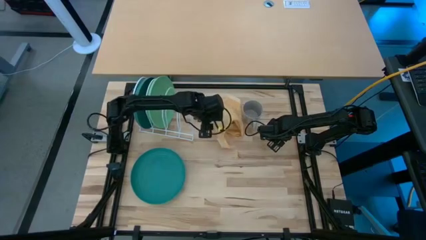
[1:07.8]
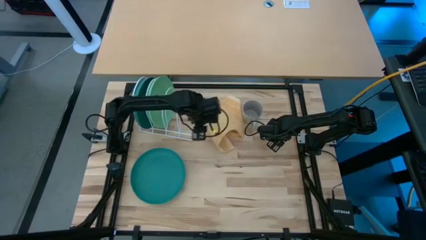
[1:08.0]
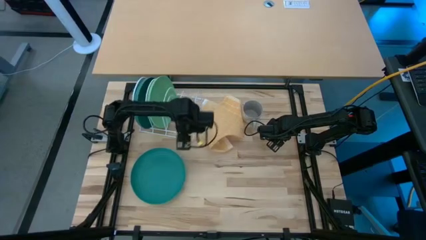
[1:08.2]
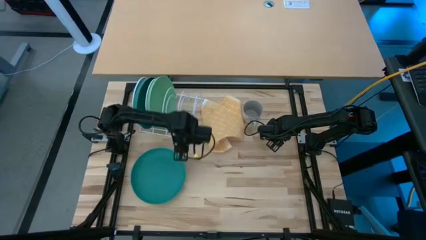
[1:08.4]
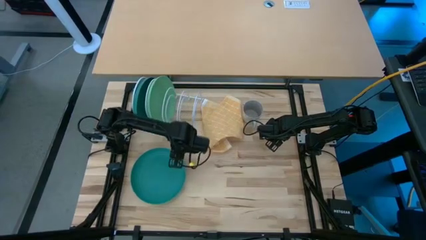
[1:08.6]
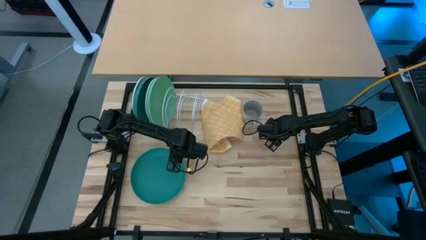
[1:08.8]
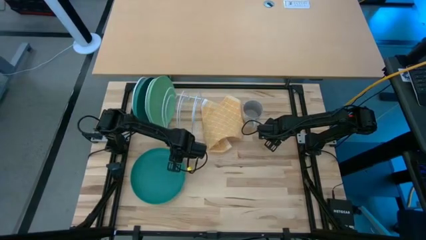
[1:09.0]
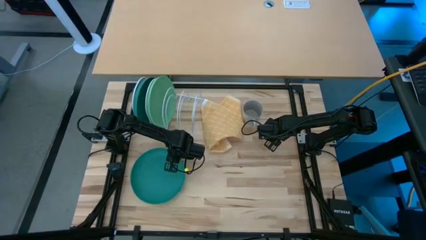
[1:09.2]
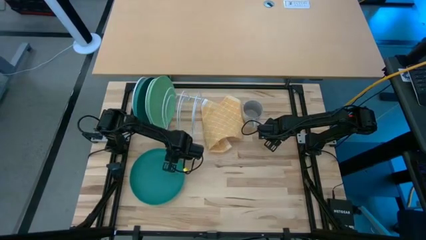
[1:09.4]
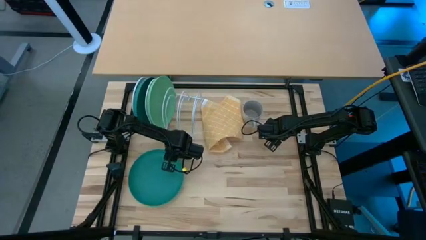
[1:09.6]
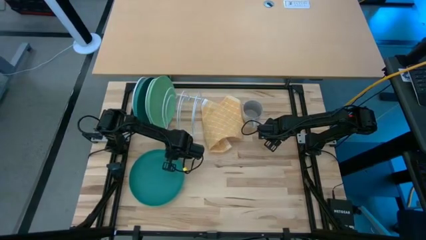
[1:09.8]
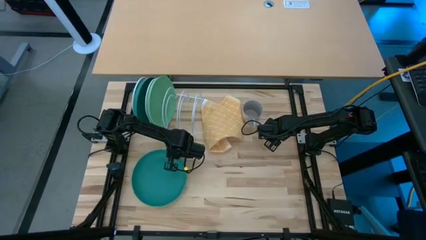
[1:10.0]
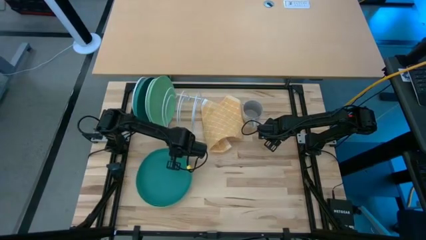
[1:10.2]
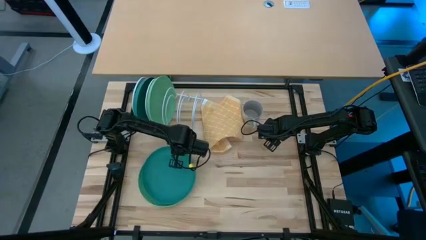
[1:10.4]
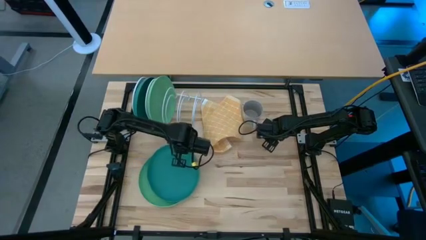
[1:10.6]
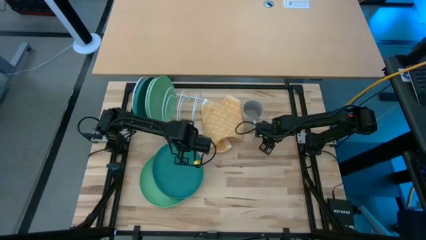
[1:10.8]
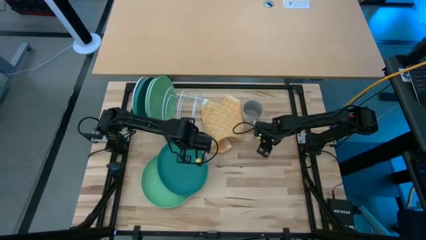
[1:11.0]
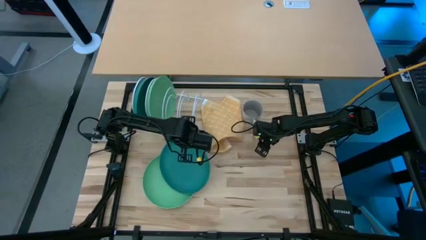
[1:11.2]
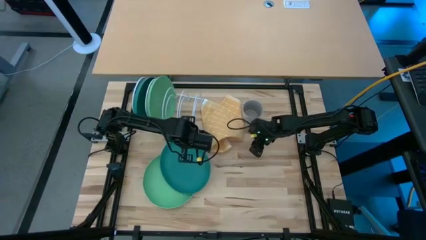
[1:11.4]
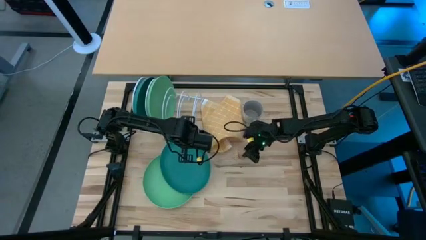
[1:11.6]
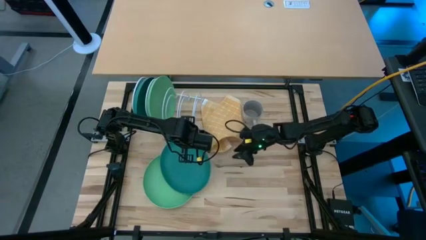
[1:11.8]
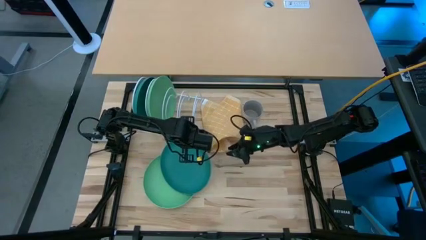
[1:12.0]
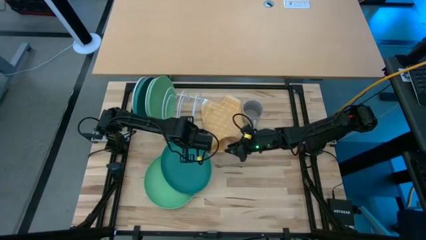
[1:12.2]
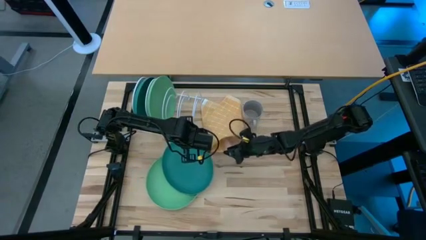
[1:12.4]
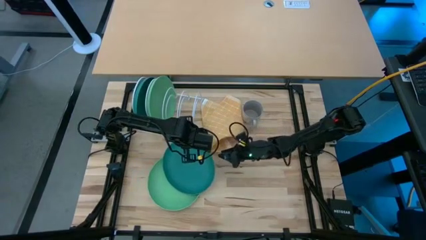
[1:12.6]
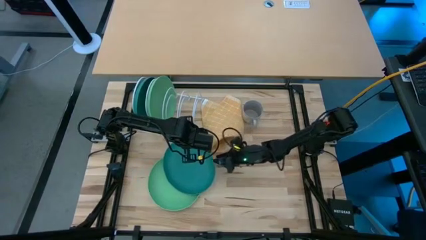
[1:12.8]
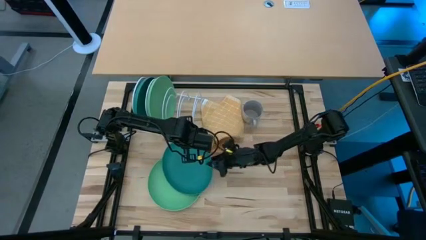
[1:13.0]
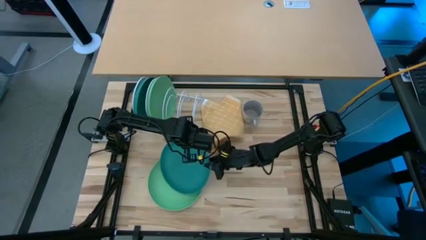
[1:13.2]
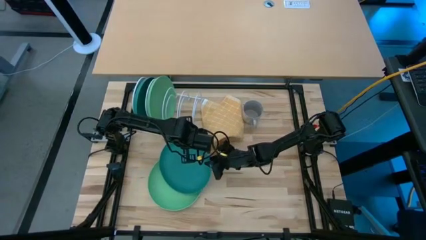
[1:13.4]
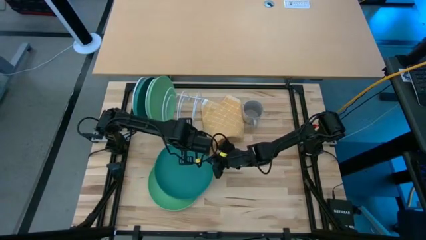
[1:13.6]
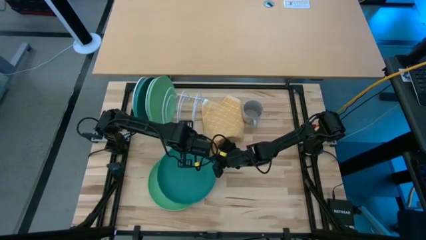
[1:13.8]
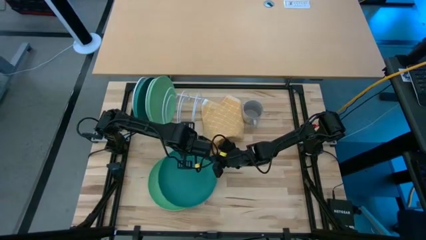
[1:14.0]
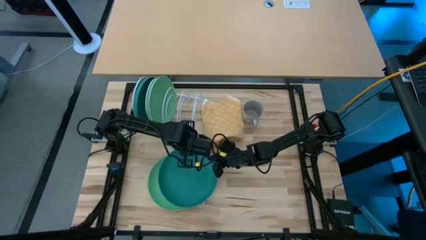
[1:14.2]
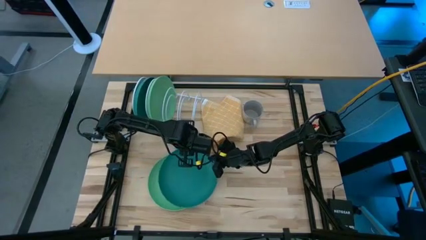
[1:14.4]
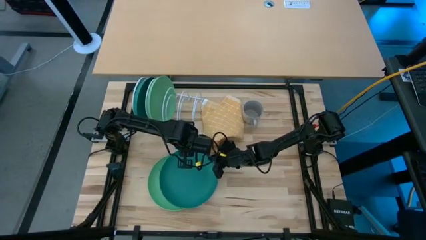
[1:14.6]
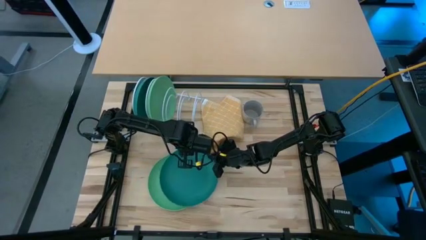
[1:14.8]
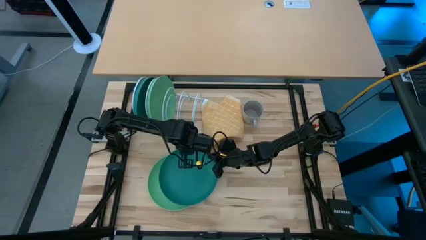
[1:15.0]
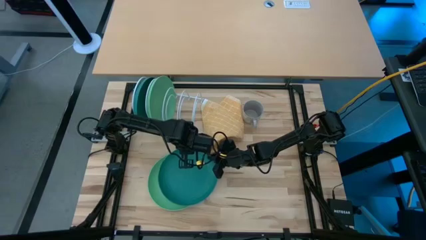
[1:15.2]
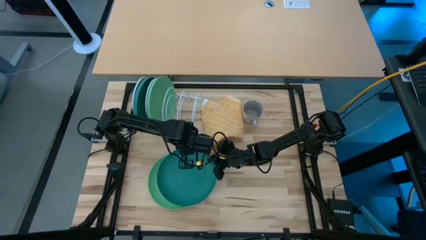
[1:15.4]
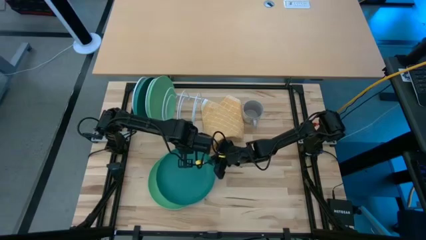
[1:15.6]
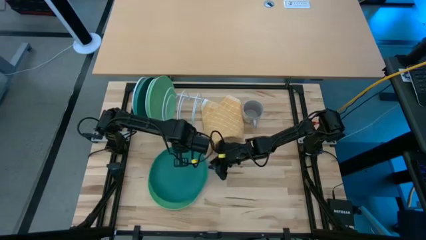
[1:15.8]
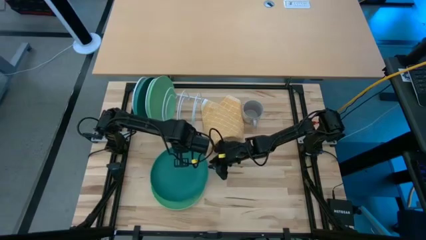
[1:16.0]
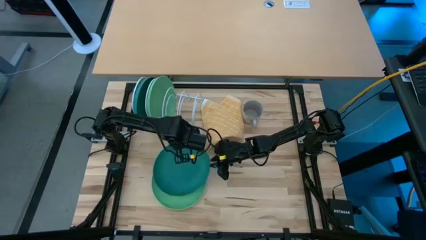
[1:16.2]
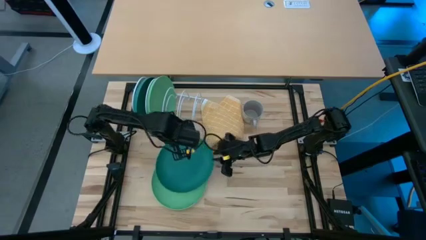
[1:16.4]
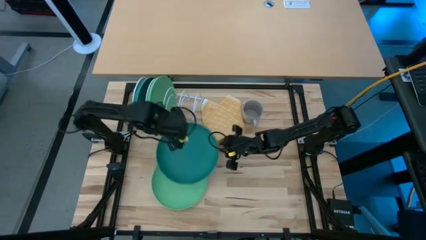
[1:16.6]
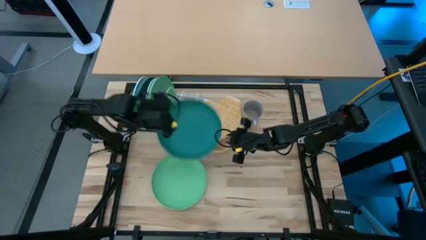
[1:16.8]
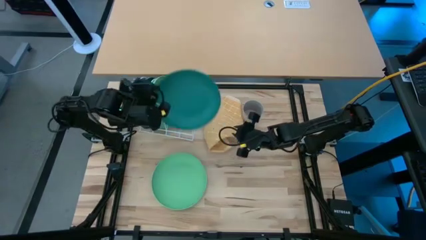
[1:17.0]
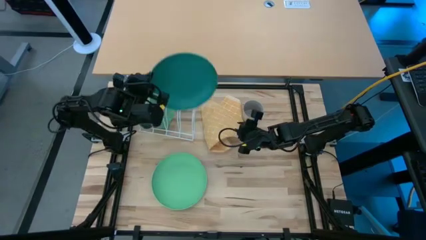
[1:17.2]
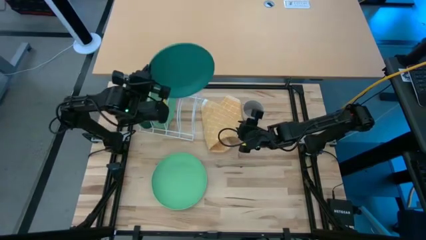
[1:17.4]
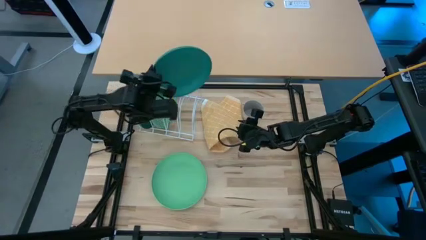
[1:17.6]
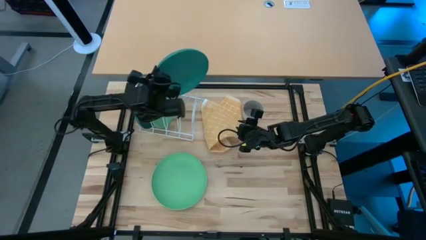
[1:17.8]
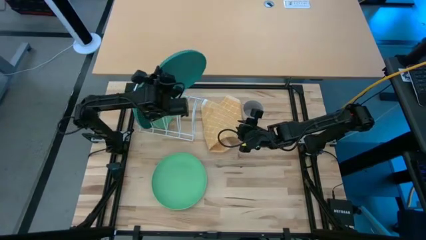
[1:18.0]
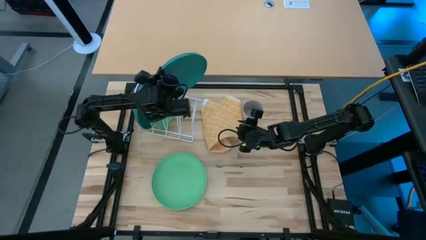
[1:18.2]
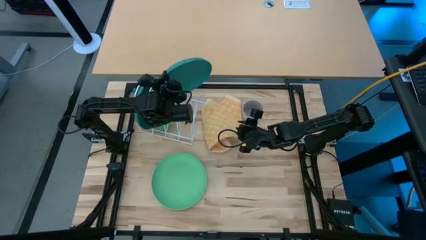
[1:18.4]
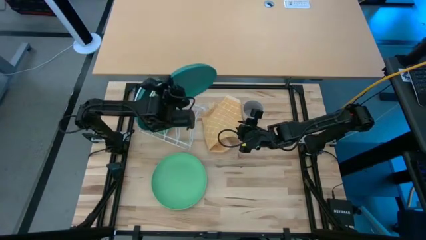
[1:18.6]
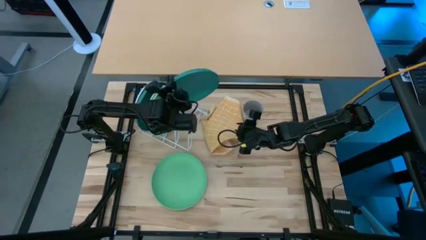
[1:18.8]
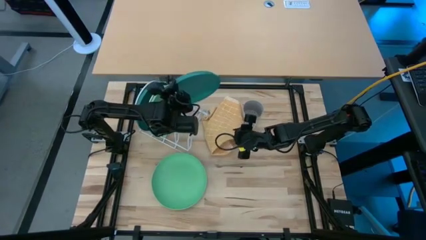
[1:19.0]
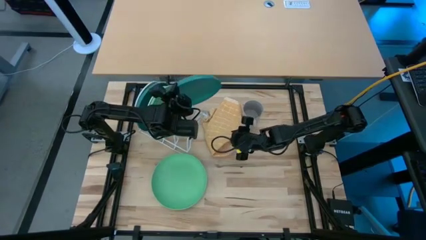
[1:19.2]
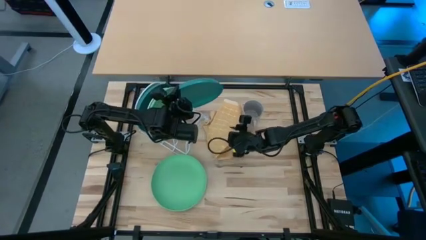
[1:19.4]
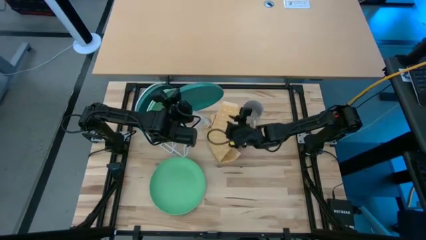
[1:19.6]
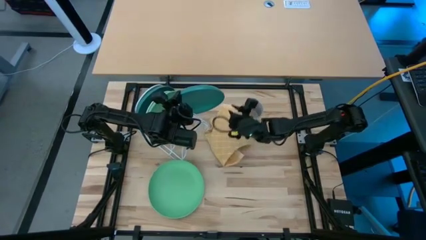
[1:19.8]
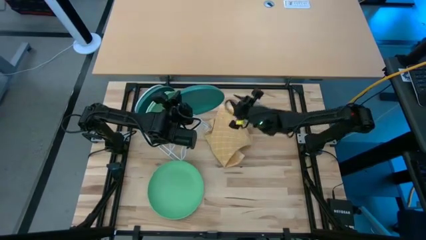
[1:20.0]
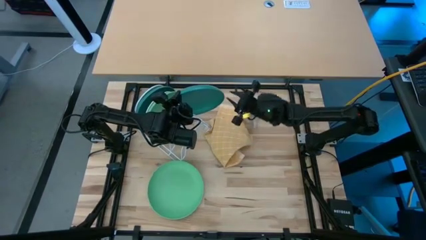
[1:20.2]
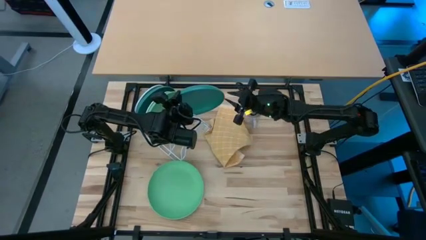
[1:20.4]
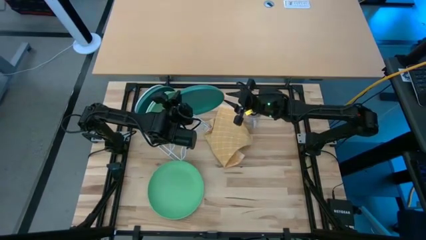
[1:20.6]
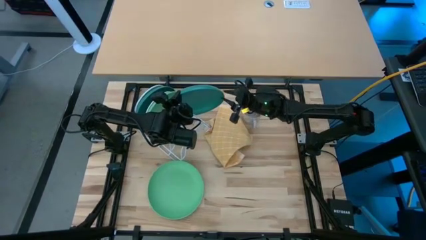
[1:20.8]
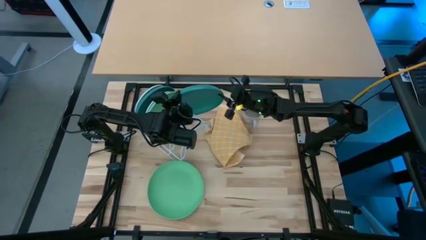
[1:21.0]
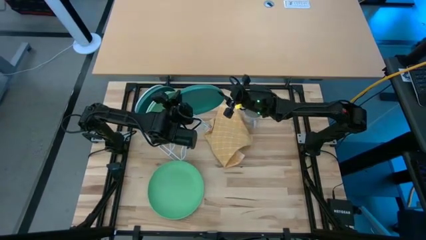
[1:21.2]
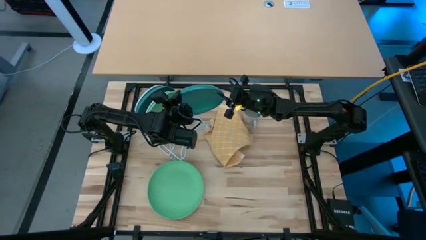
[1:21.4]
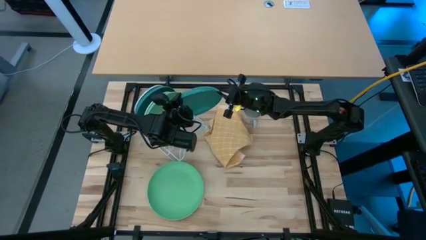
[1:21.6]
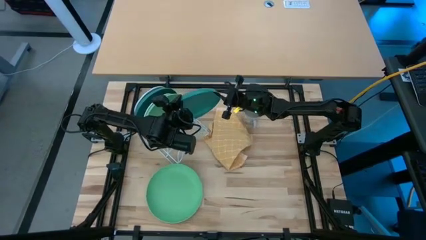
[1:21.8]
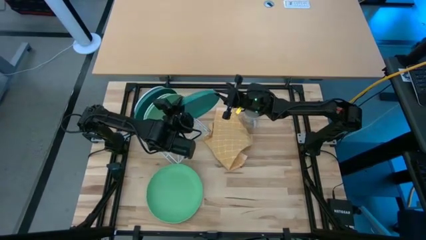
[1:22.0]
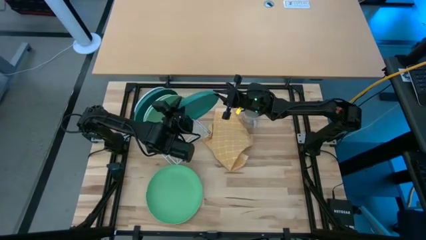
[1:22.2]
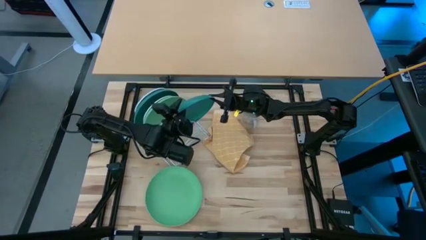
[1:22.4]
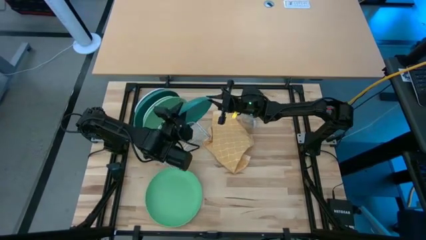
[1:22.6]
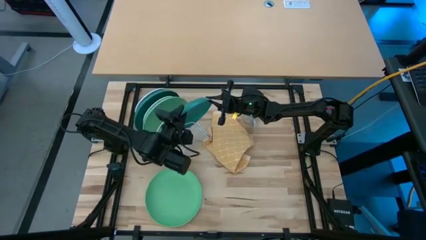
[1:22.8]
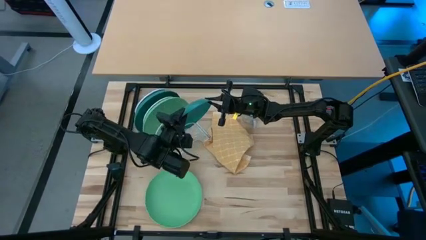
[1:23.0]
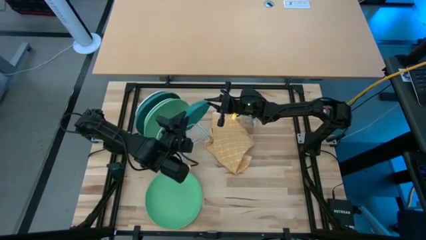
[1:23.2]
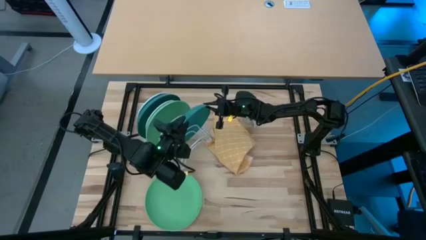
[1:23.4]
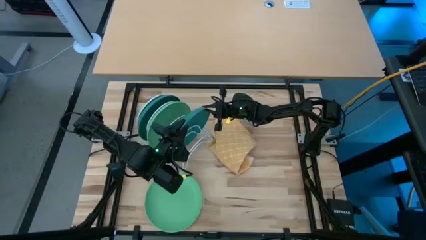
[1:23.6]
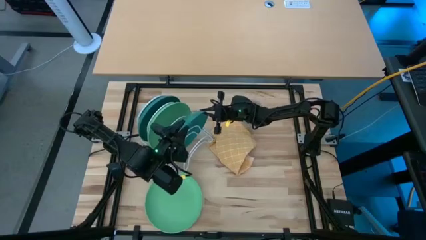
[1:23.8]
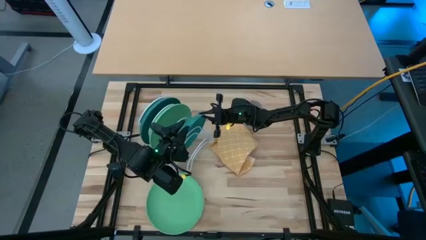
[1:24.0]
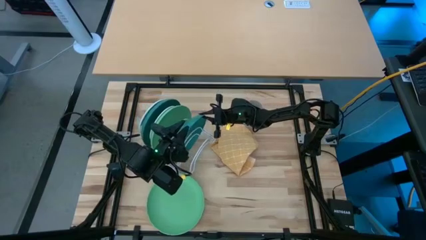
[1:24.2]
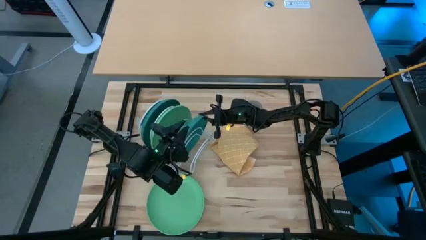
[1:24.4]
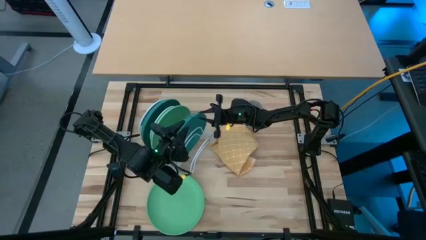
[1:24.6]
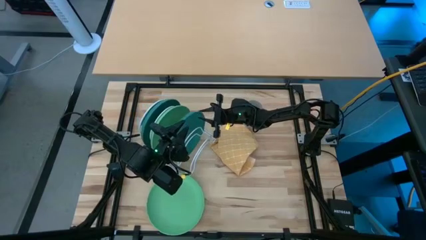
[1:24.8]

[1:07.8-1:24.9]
Task: Sort dishes
Put the left dark green plate into the dish rack
